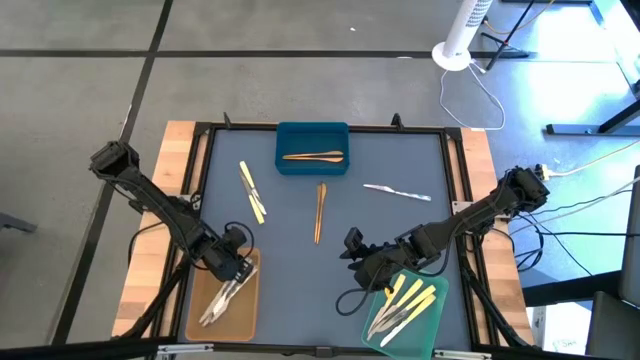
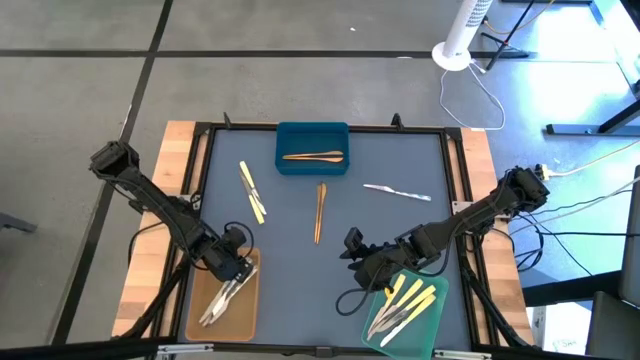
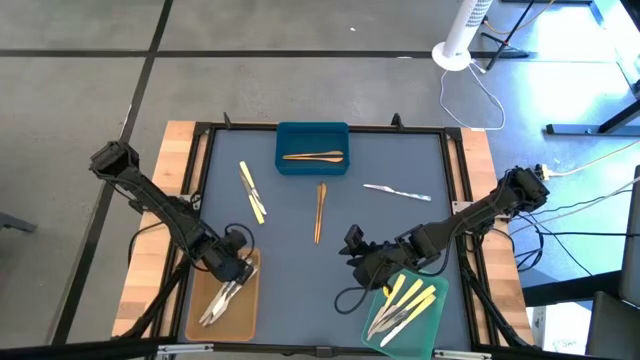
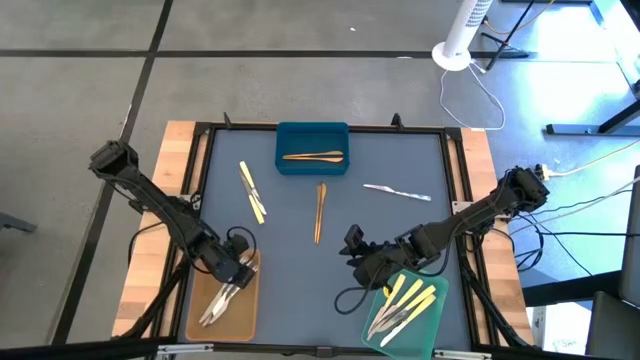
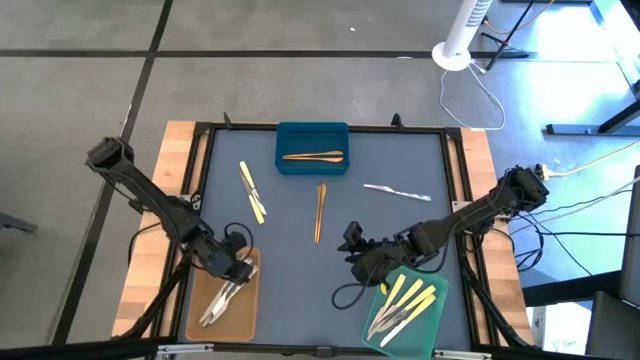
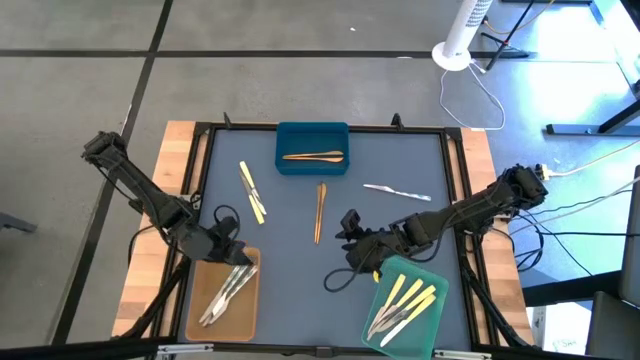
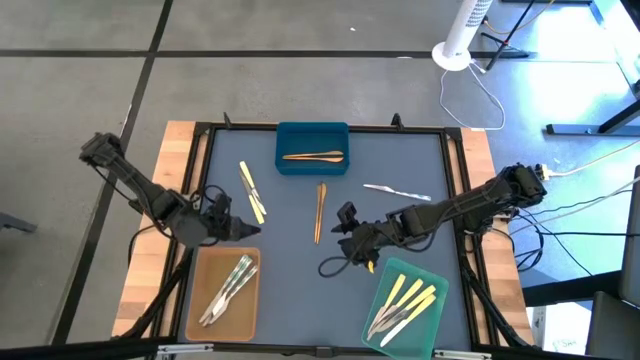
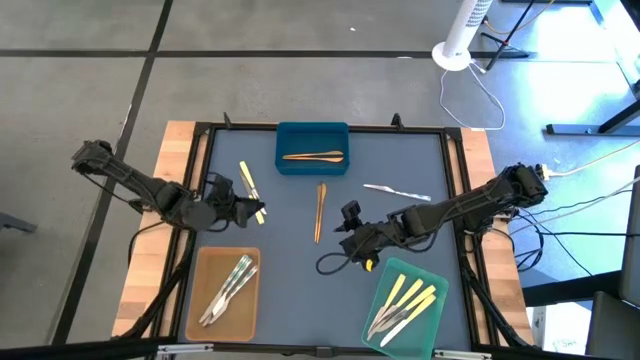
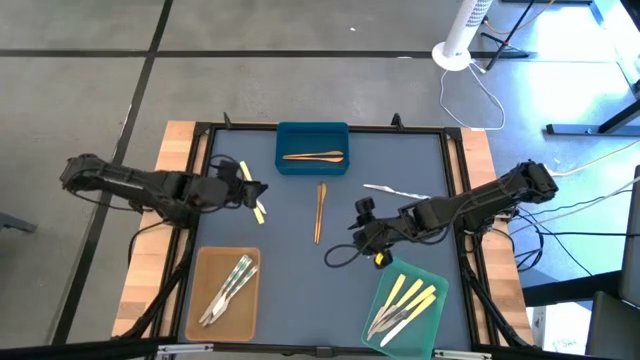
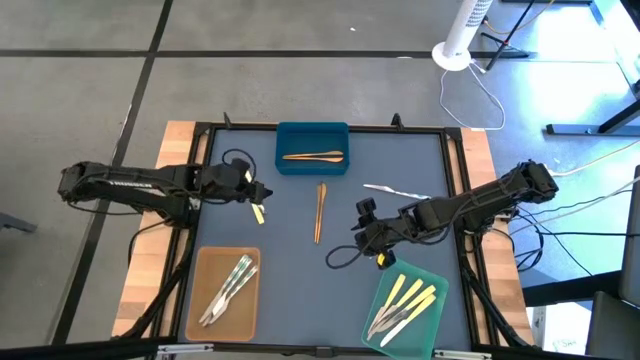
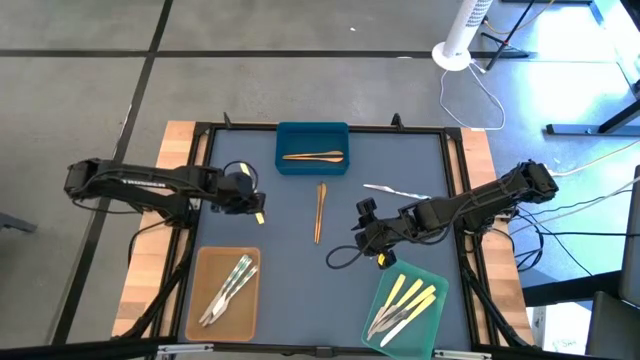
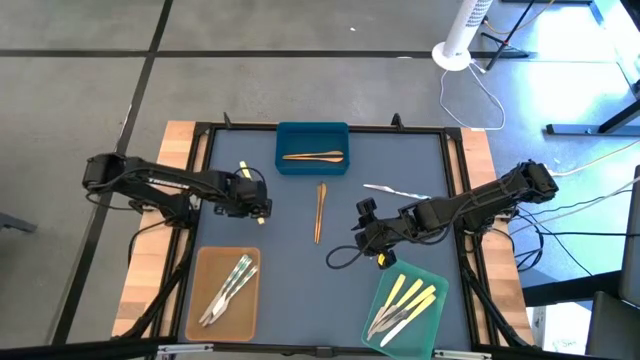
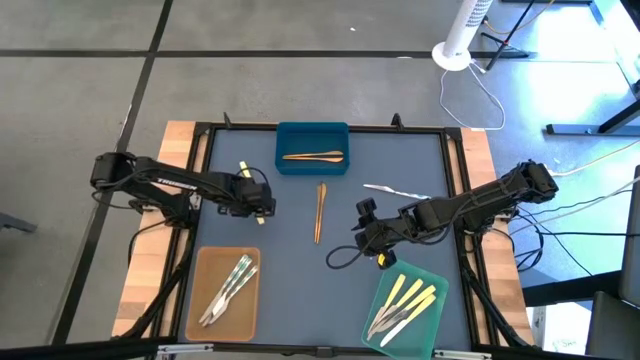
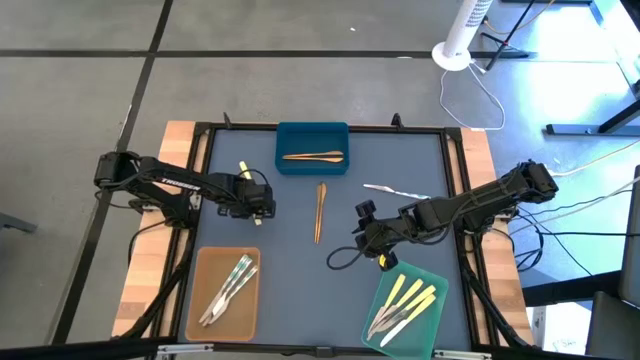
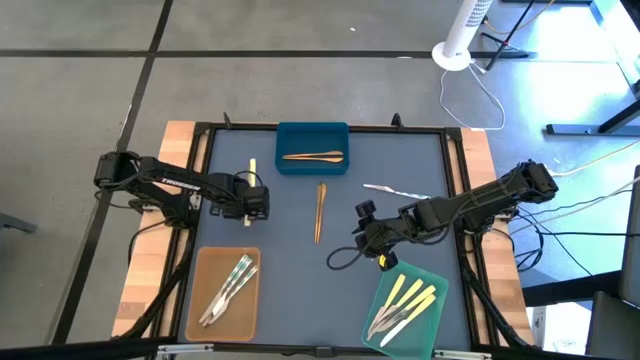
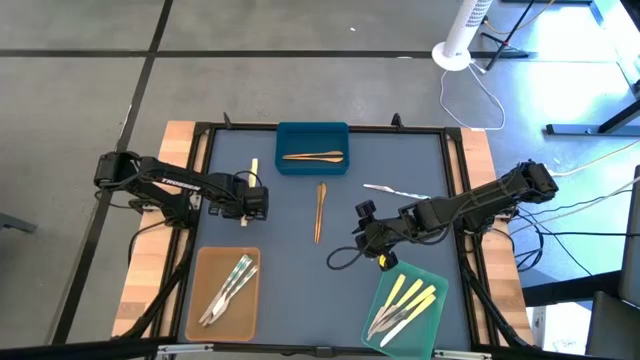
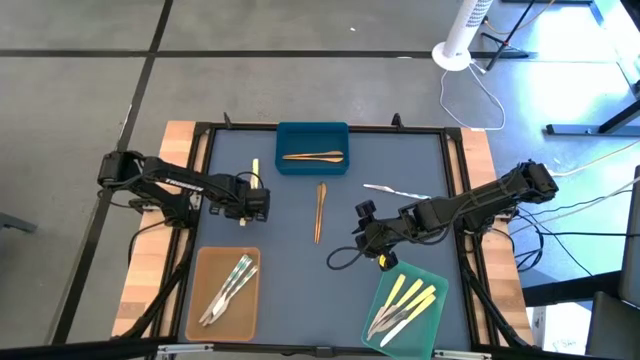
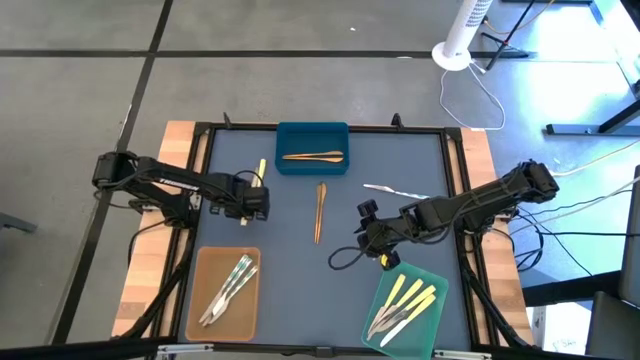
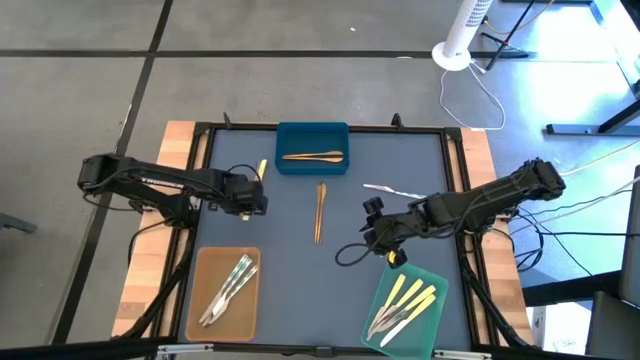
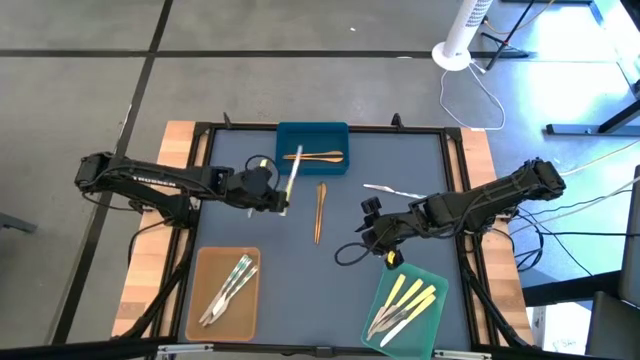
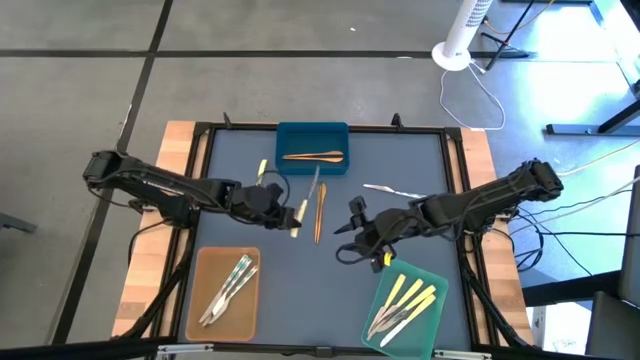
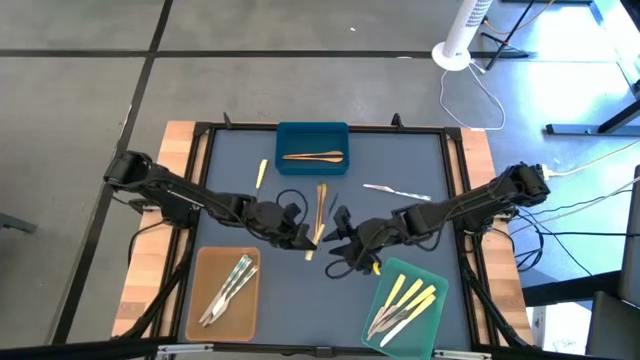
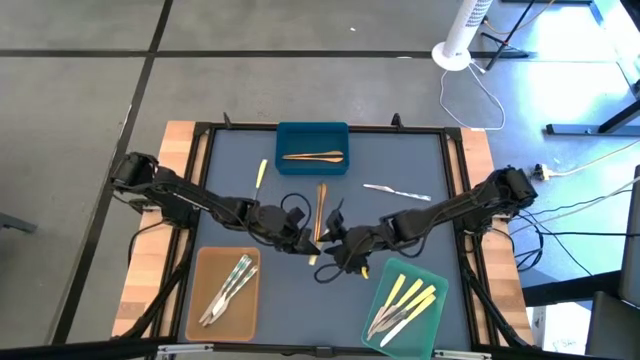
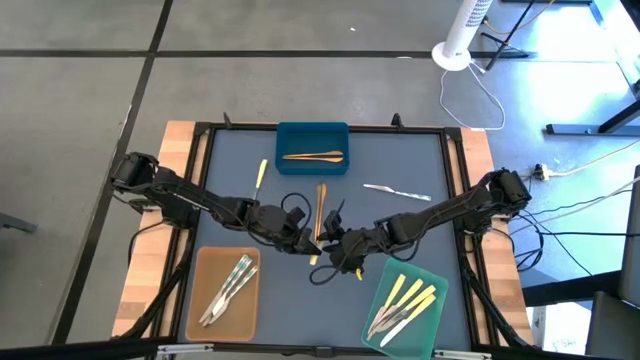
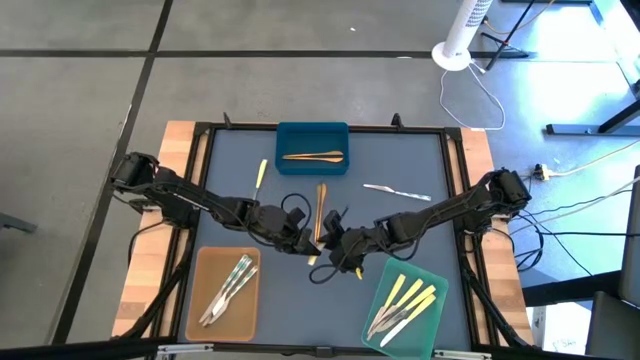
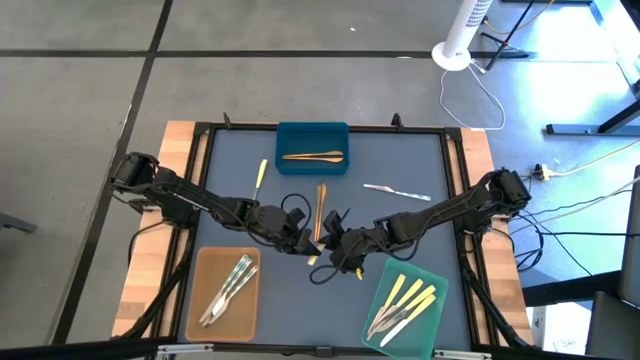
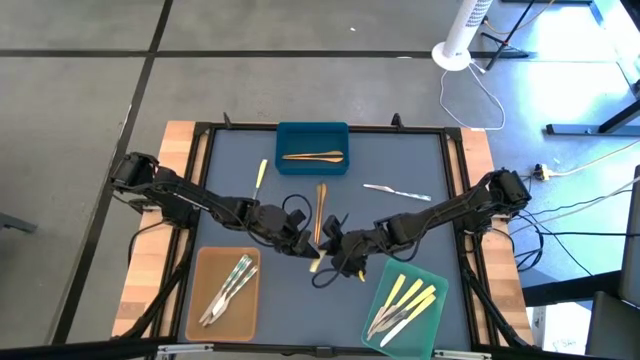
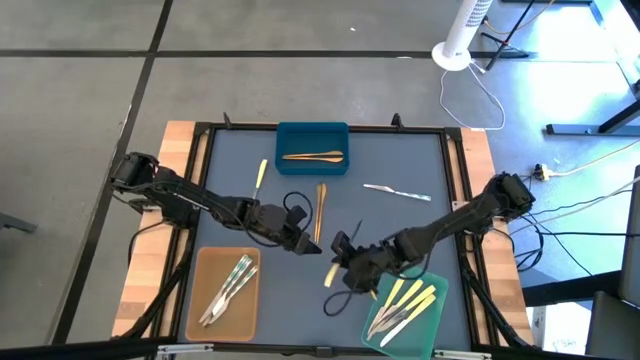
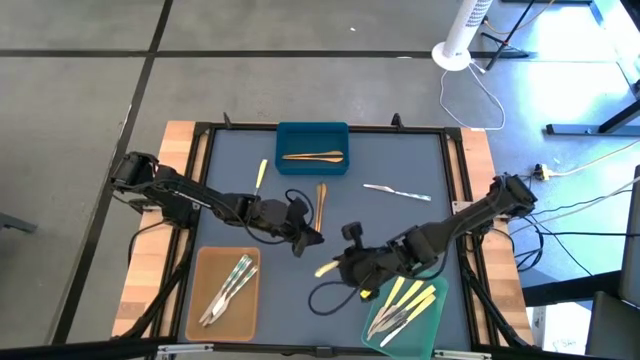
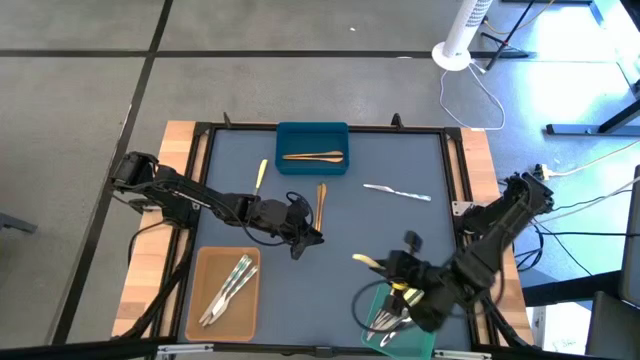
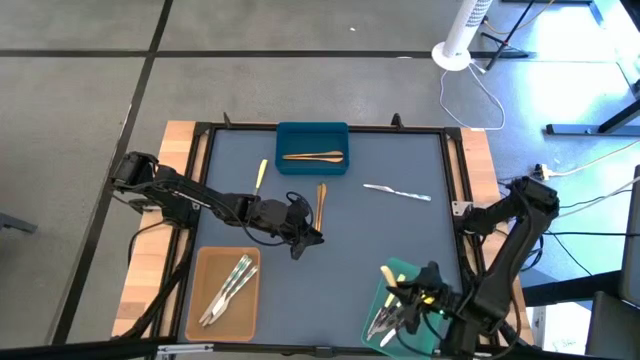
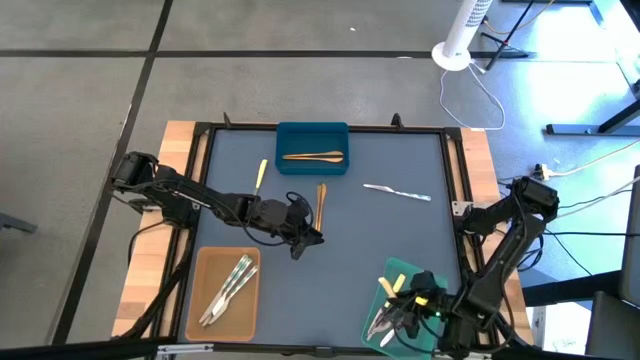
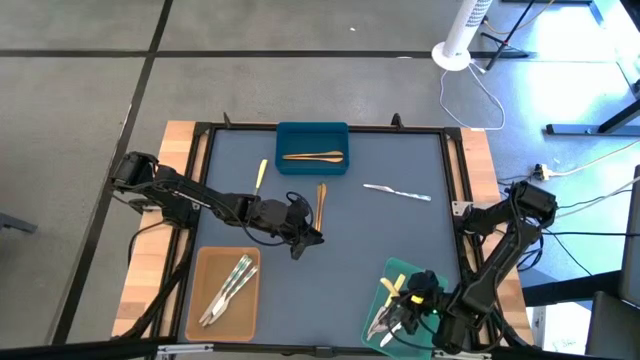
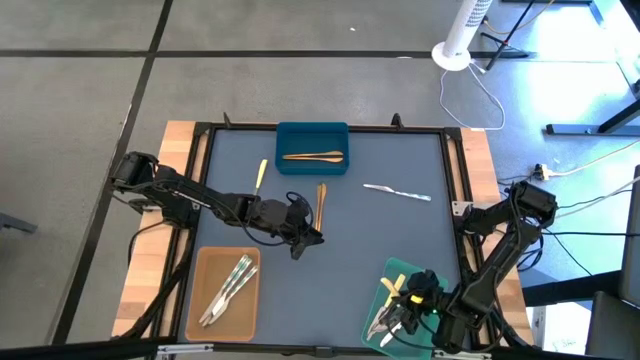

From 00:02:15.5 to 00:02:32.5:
Task: Sort silverware by color (type)
Put the yellow knife into the green bin

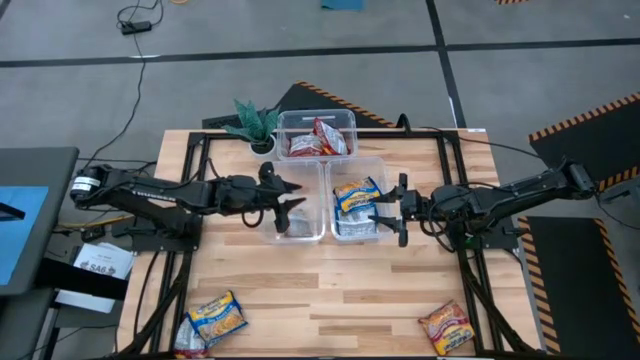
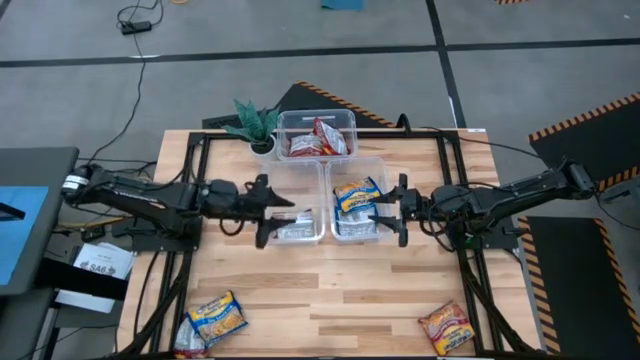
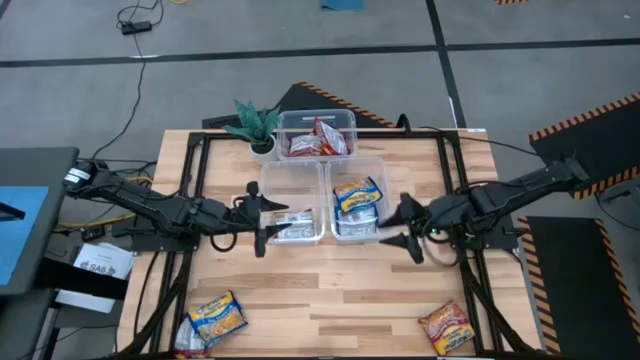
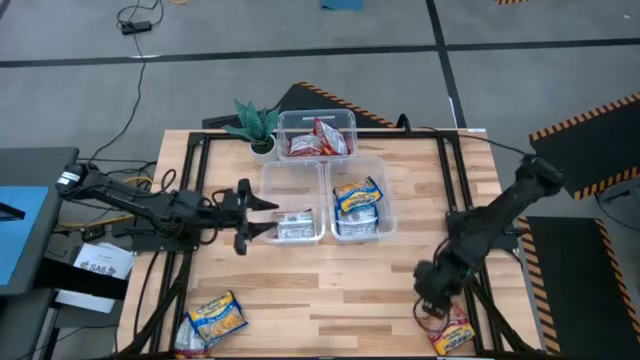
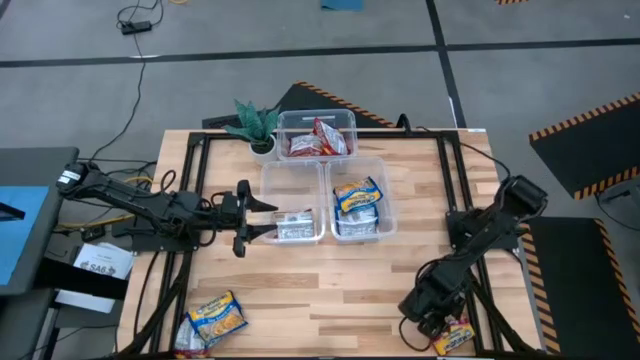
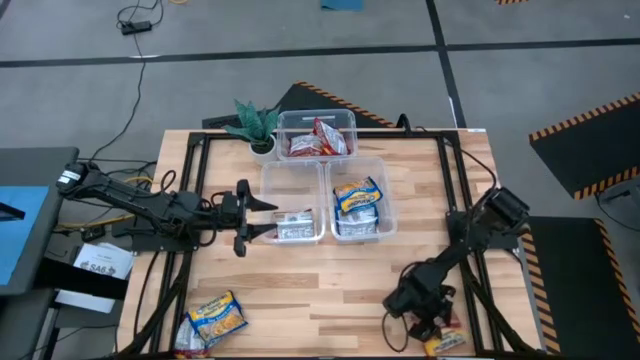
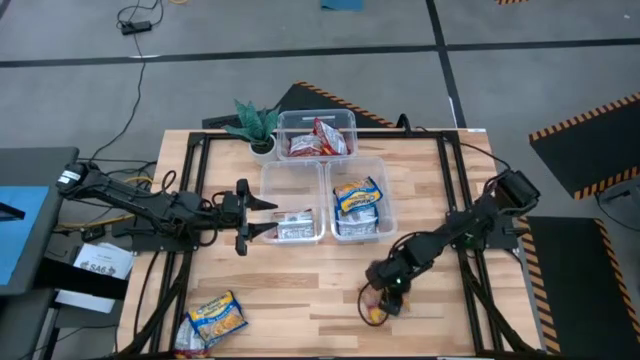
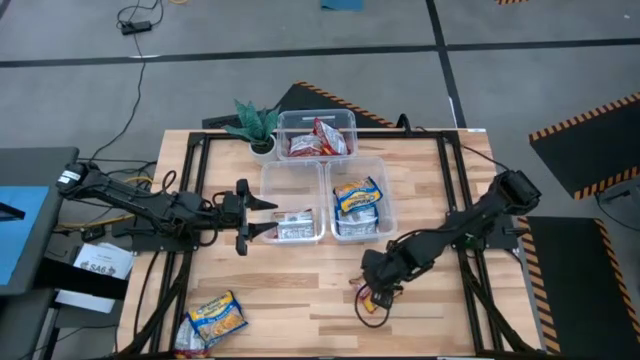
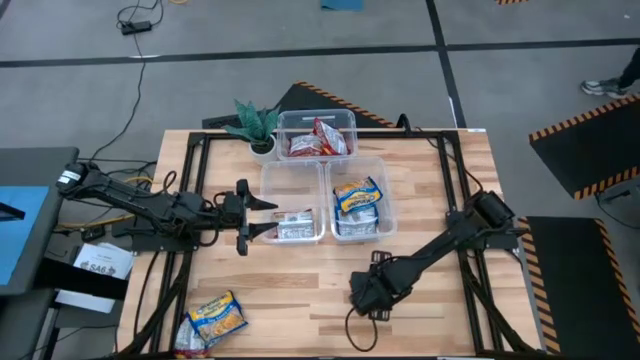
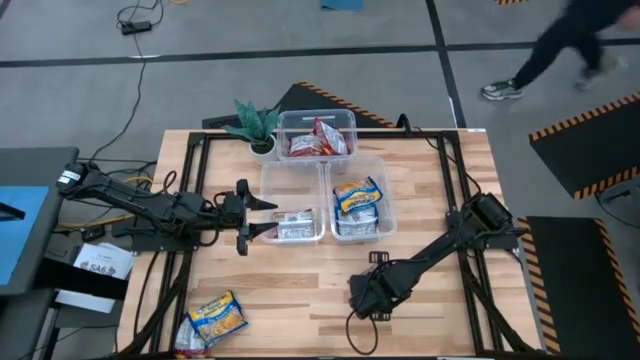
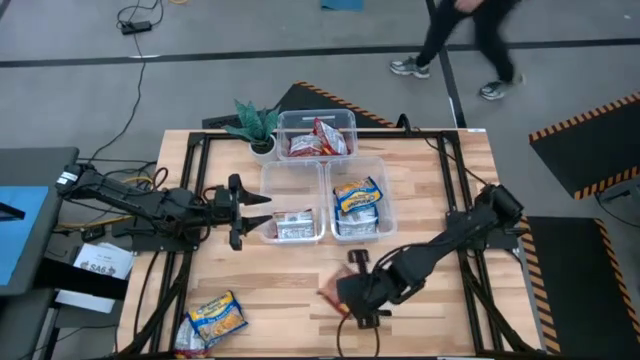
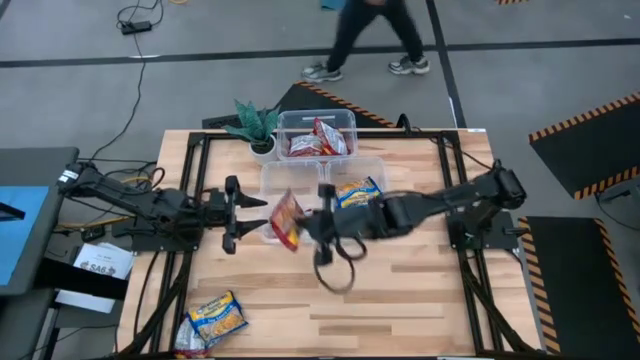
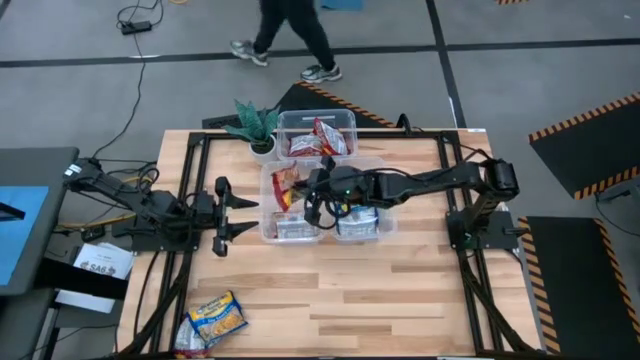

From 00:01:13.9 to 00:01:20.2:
Task: Sort Maruchan noodles
Put the red noodle pack into the bottom left transparent bin
